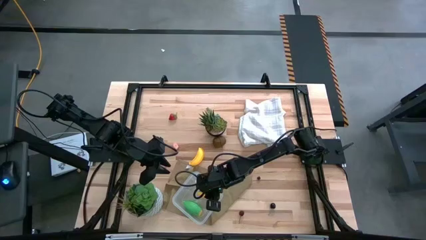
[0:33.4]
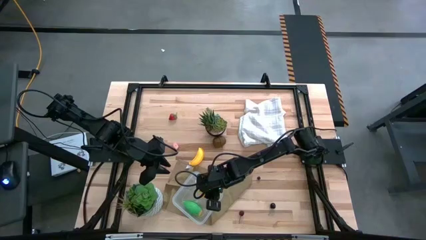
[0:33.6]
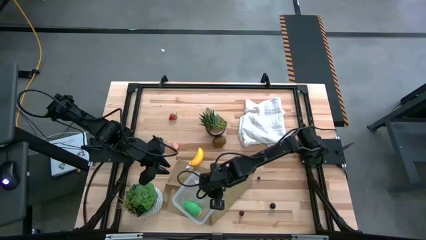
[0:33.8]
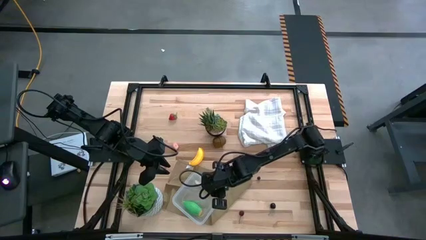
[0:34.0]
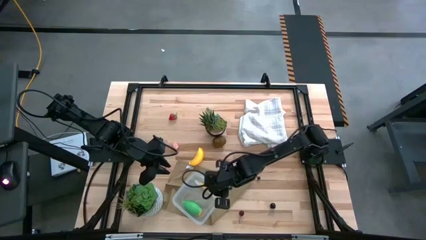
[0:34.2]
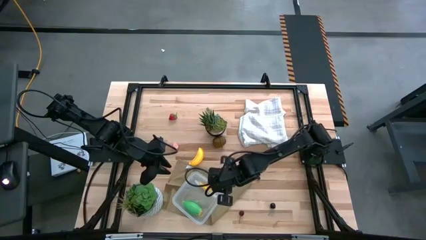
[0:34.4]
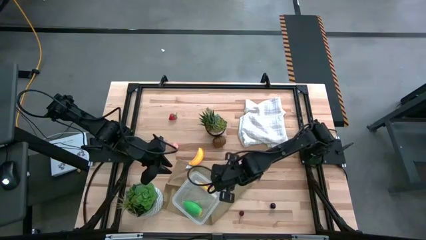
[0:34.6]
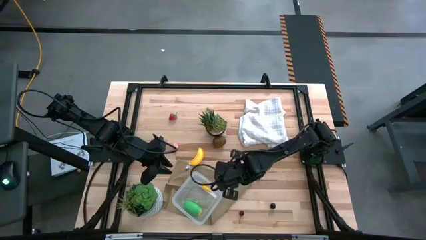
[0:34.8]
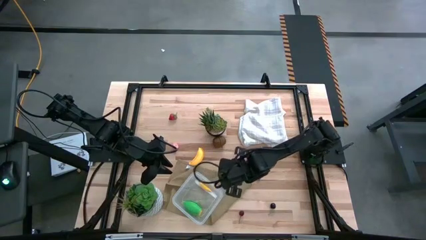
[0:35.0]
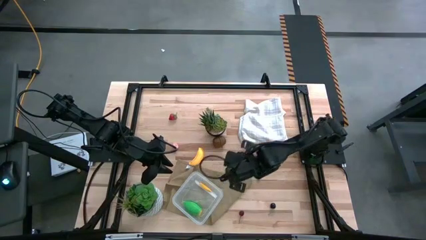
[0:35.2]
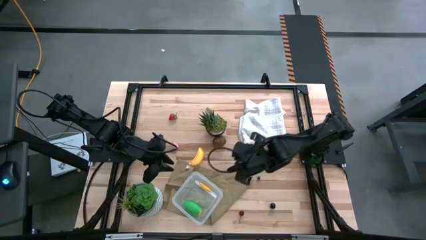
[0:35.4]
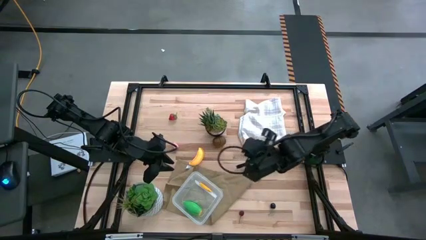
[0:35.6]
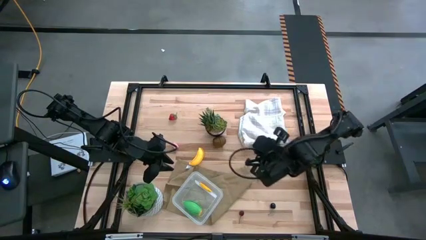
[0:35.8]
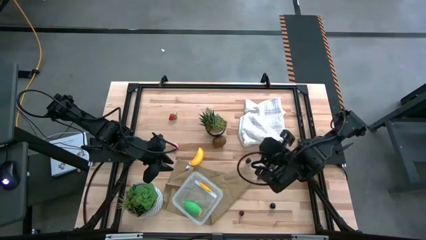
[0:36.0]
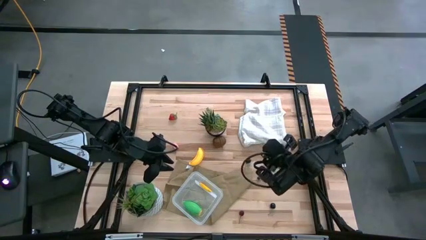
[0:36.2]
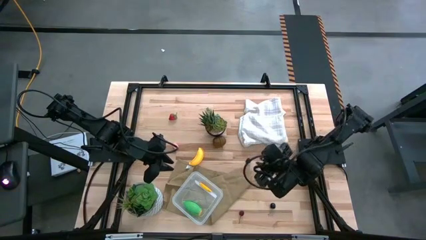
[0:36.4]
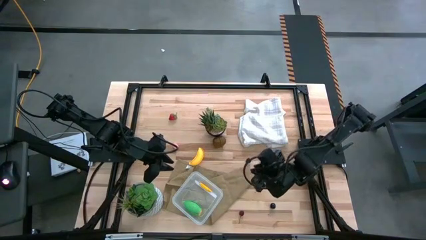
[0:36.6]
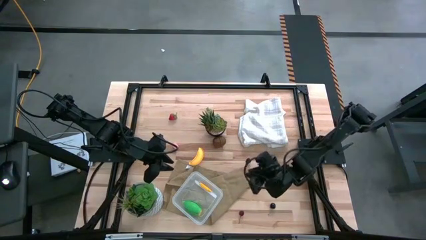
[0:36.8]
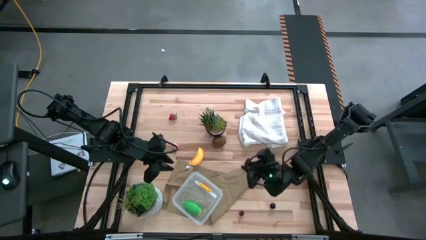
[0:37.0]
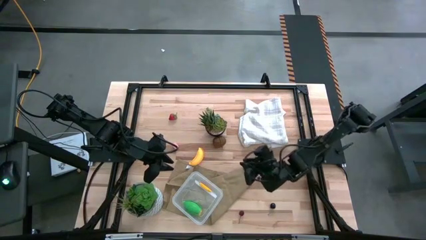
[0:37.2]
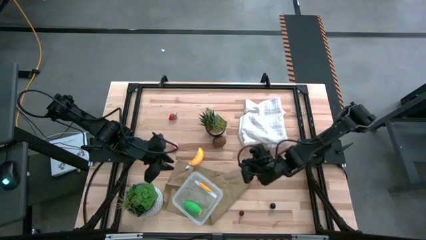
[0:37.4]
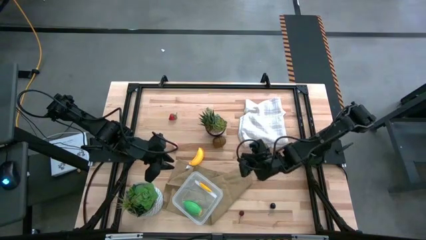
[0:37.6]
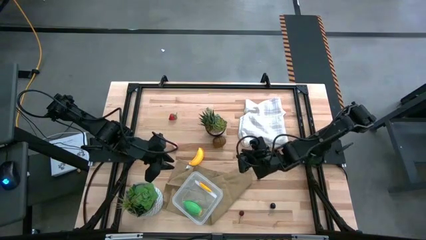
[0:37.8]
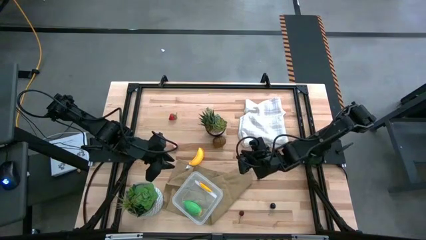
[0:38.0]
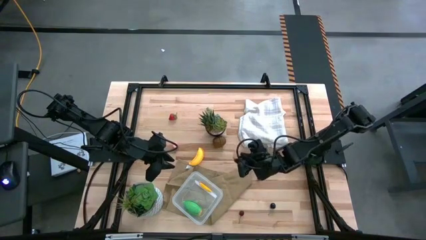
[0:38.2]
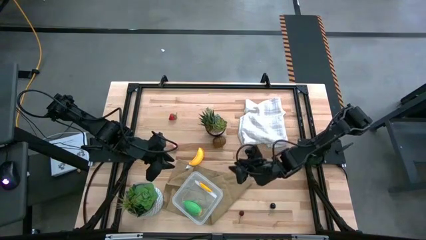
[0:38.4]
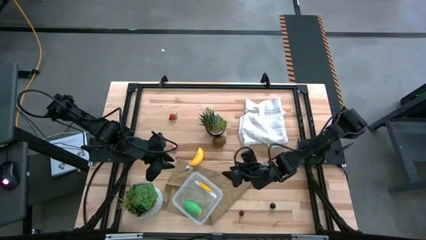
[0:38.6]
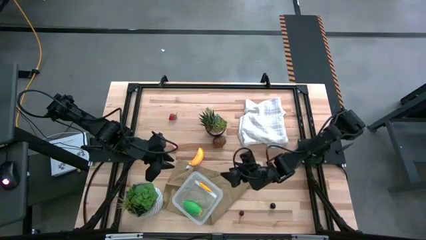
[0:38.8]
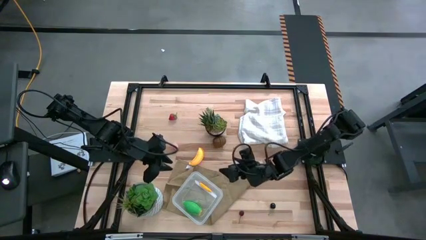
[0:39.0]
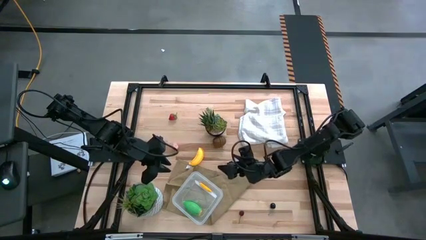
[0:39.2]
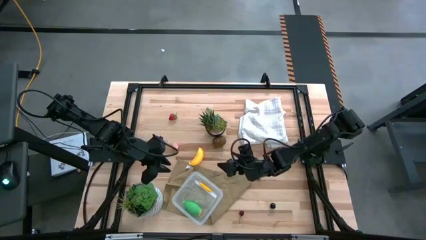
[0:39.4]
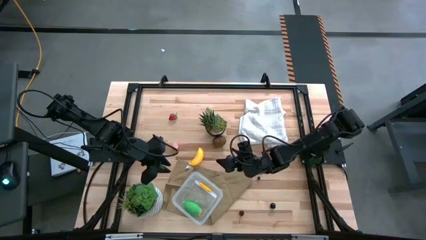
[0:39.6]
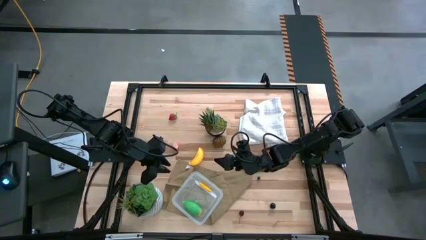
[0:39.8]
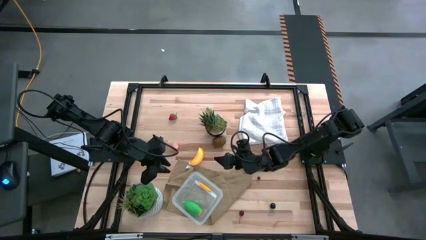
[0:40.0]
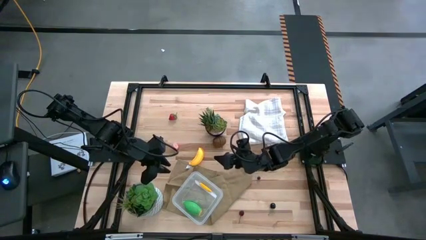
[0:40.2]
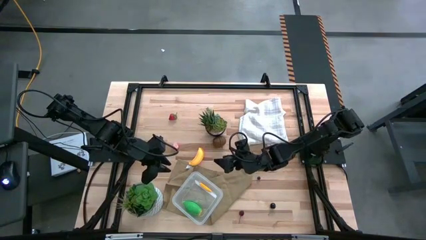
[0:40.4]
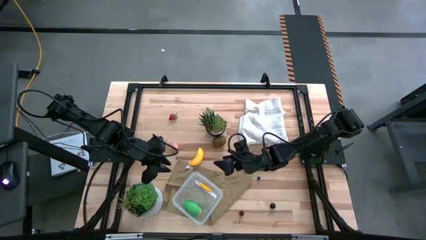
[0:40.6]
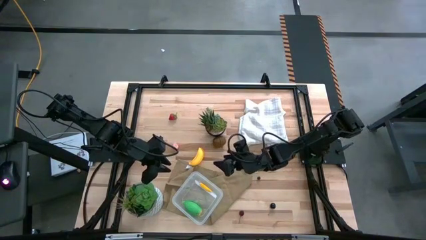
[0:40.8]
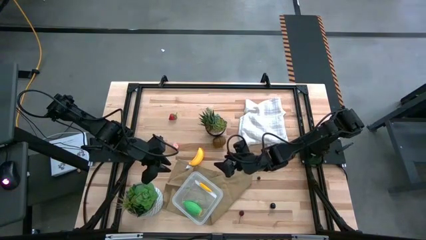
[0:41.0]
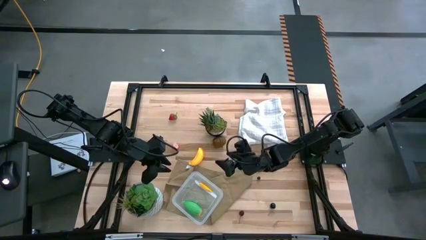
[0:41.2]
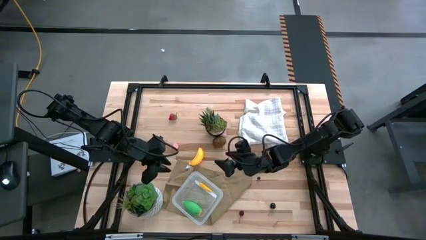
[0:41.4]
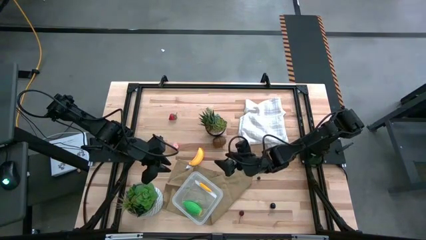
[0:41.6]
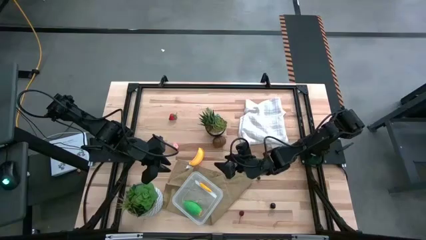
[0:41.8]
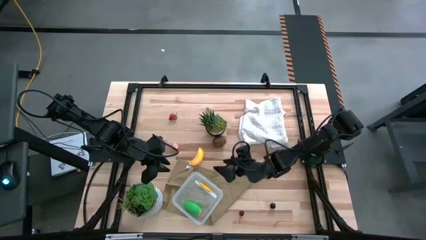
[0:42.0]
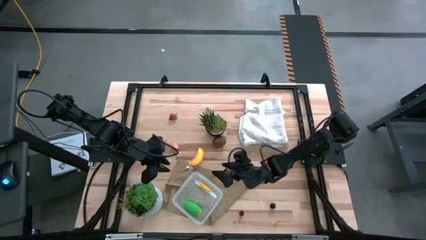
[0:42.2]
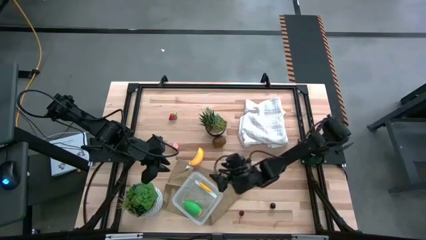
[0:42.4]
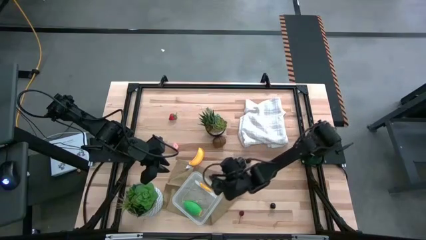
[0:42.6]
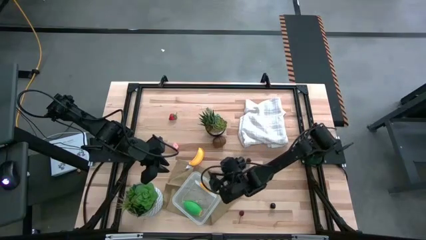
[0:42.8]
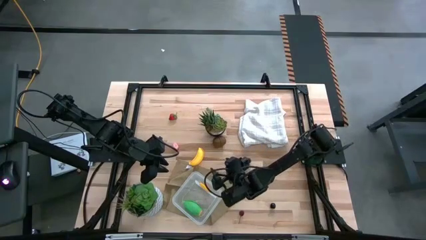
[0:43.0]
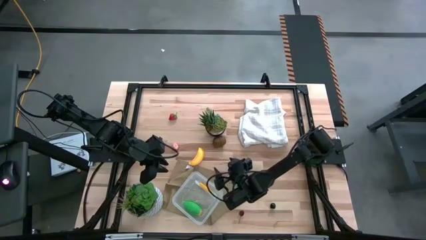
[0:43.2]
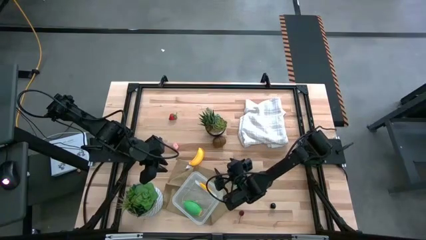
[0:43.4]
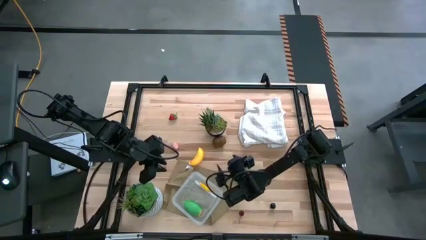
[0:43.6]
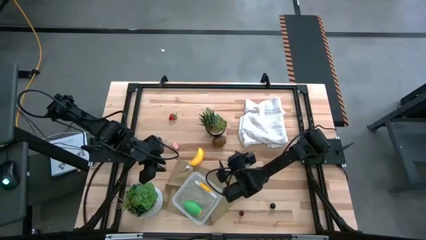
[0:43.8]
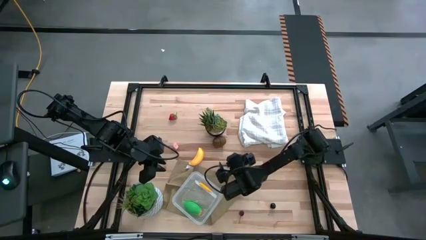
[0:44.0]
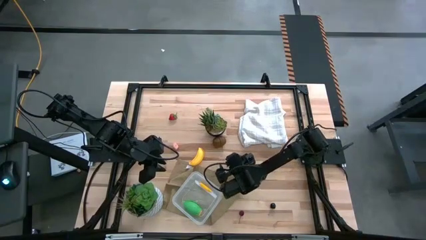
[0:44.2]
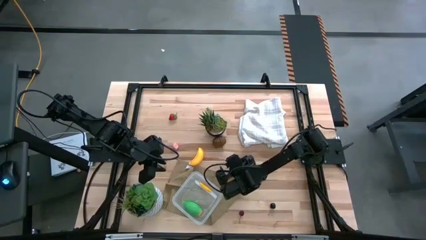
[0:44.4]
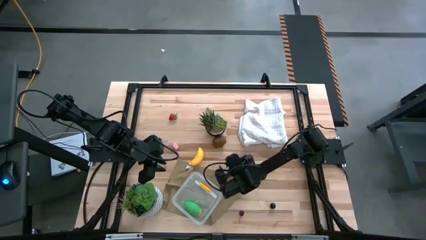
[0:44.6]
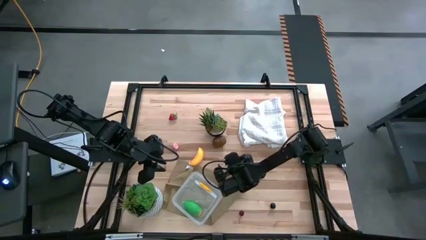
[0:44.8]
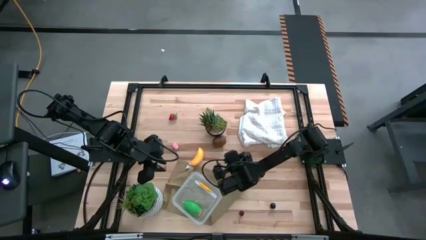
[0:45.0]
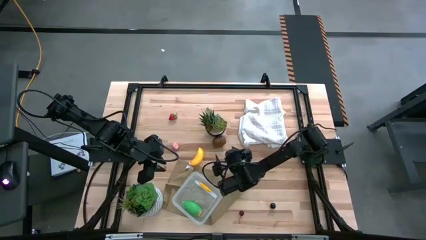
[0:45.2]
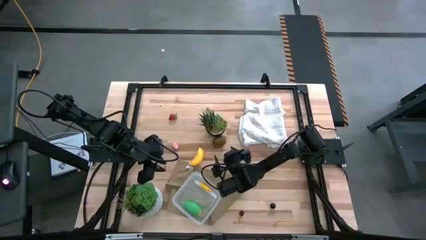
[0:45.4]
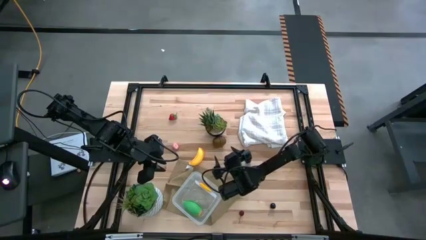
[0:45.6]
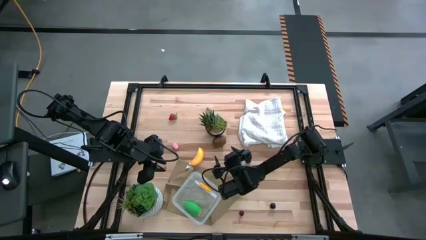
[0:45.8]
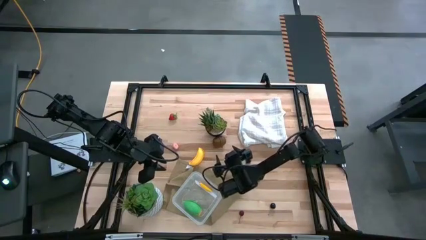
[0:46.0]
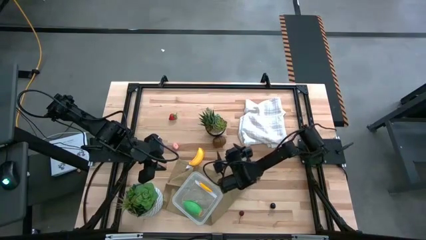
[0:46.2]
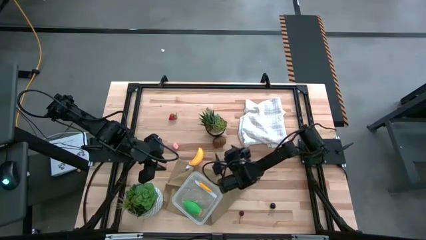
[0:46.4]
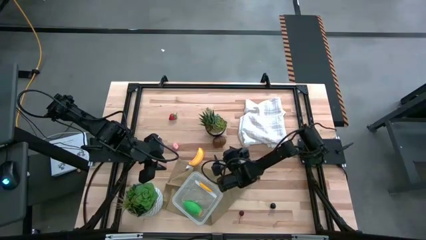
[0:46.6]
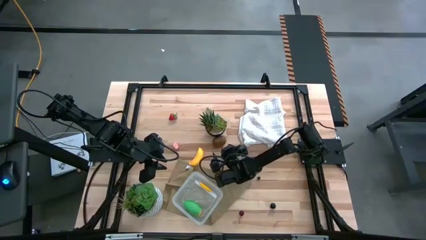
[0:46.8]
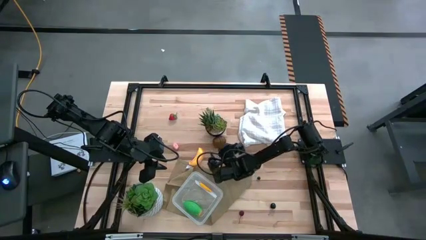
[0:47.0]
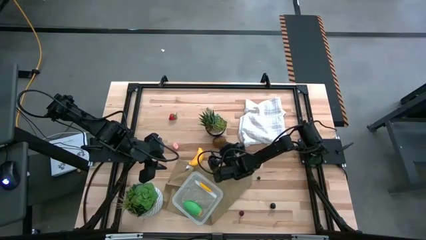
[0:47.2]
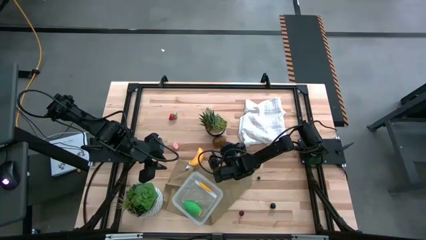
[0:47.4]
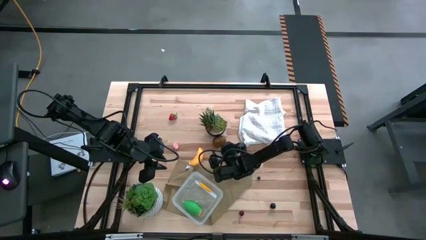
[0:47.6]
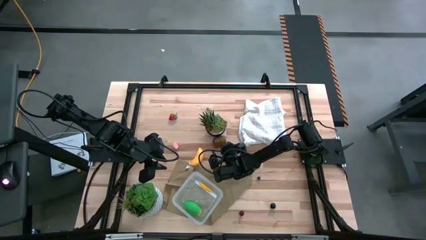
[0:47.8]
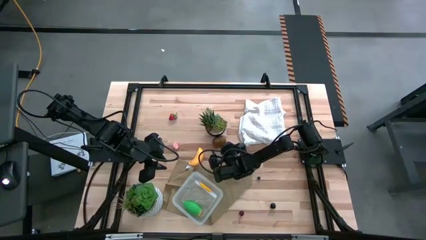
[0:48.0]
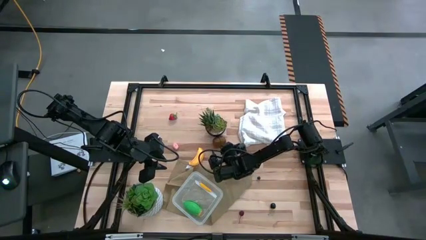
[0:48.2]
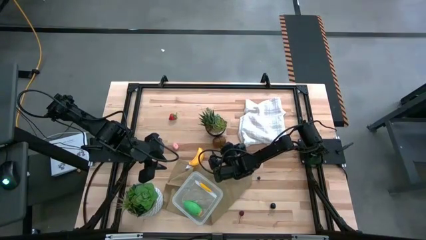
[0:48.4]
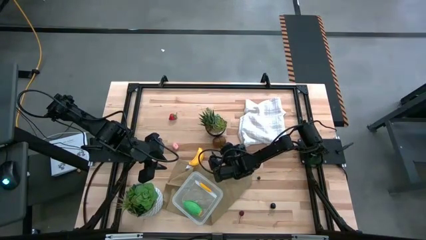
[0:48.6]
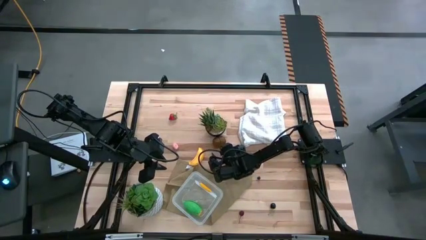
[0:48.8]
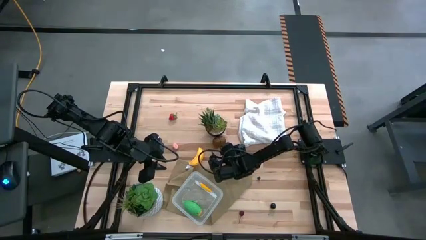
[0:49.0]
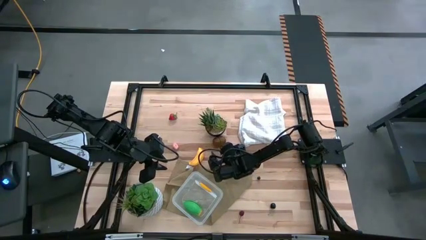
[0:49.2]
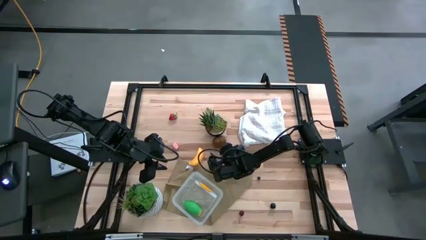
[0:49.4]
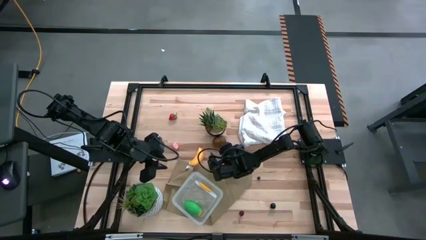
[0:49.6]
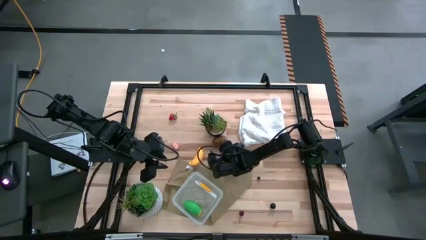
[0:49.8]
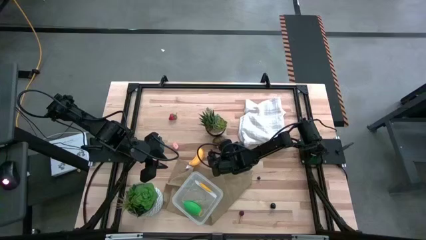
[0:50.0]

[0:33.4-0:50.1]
Task: Pick and placing Produce into tupperware
Put the kiwi into the container

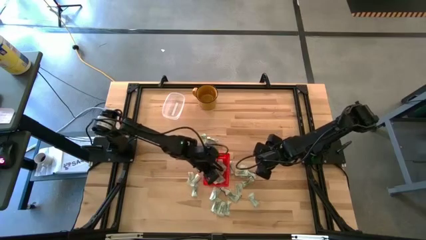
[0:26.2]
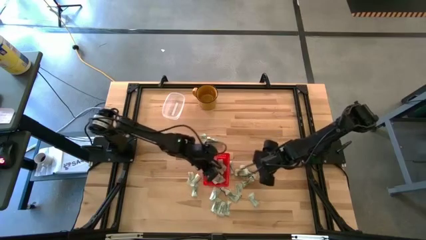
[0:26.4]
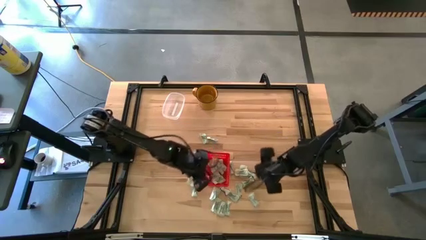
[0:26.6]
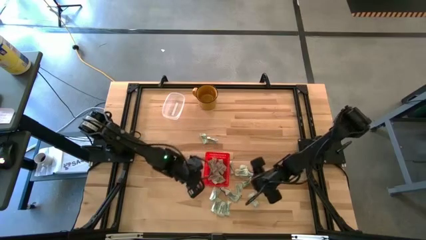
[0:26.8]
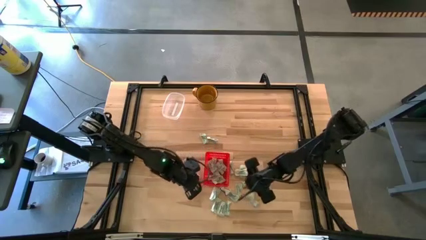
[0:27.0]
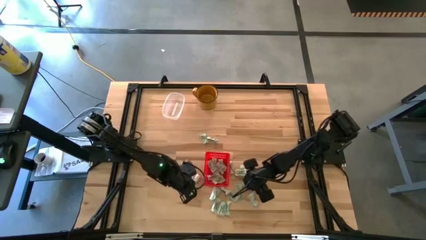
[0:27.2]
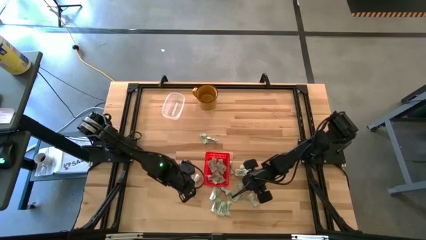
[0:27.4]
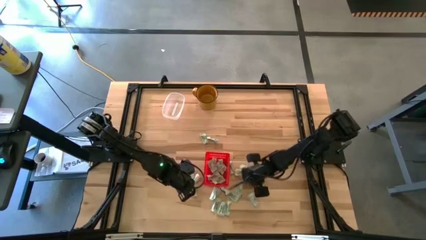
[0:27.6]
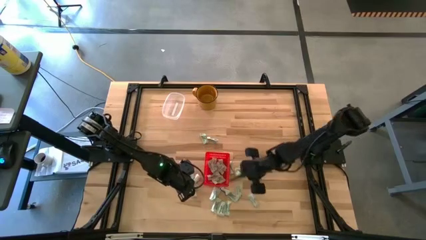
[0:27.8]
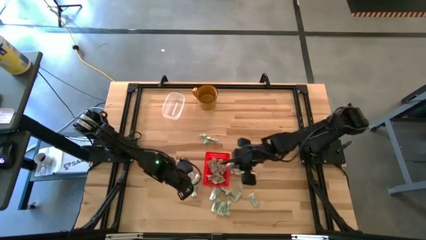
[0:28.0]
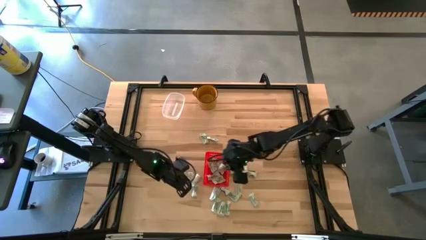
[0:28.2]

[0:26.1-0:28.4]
Task: Pick and place Stevia / Truvia into bins
Put the white stevia packet into the red basket
